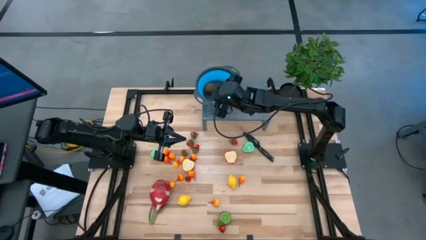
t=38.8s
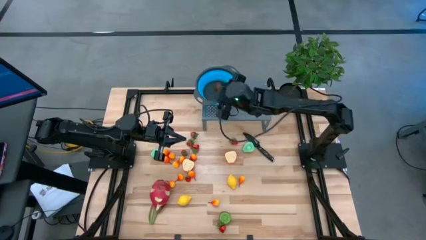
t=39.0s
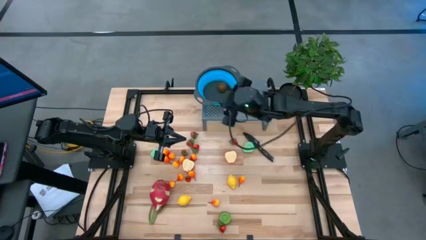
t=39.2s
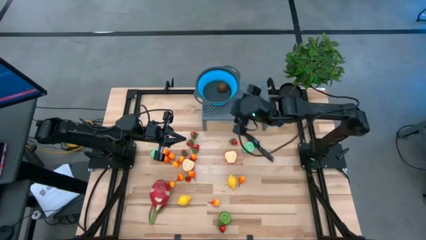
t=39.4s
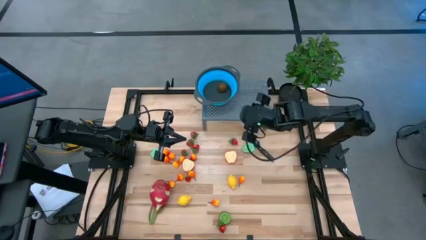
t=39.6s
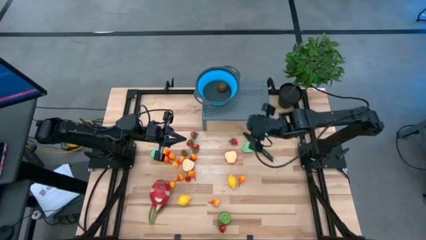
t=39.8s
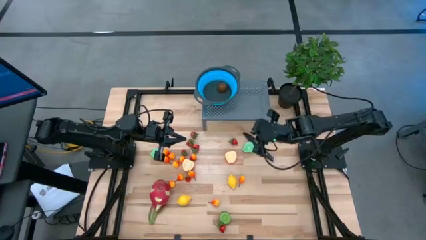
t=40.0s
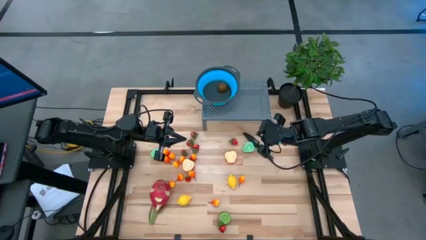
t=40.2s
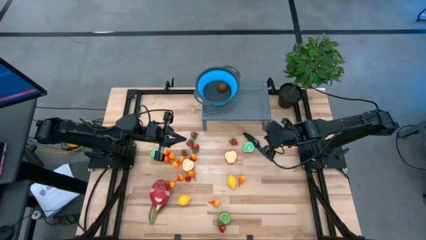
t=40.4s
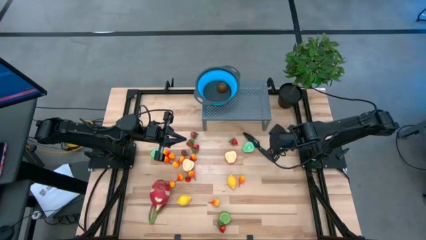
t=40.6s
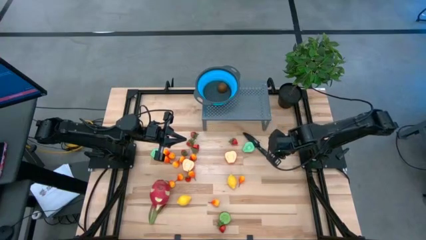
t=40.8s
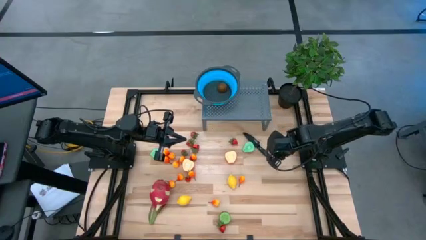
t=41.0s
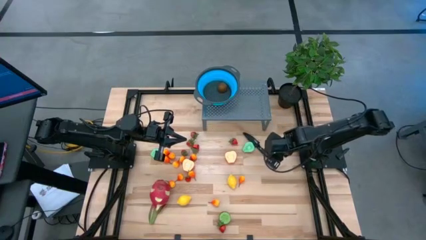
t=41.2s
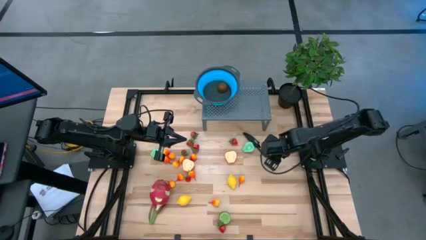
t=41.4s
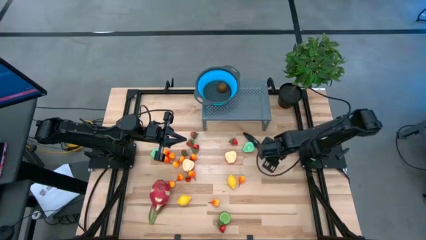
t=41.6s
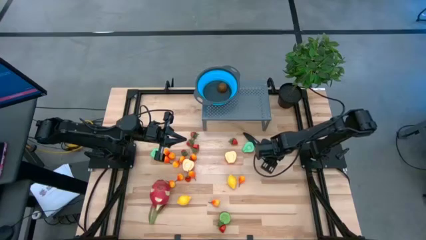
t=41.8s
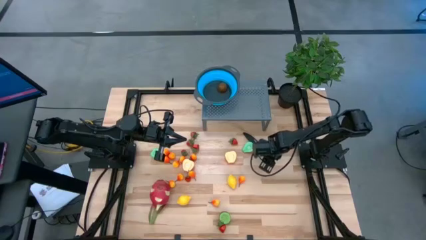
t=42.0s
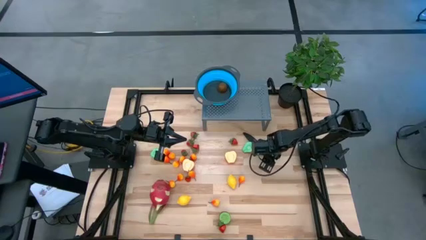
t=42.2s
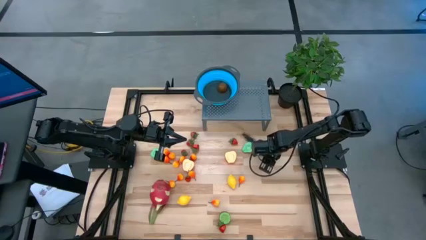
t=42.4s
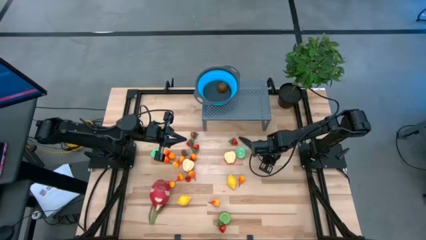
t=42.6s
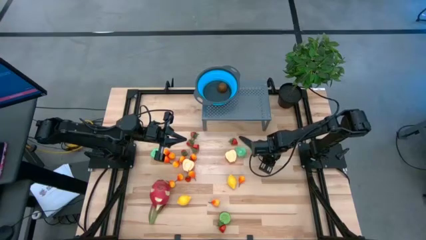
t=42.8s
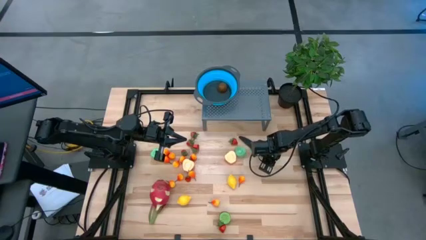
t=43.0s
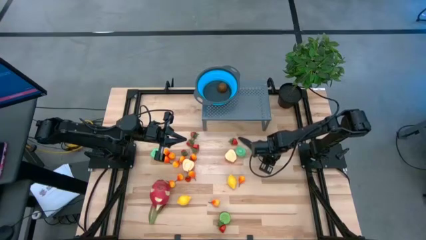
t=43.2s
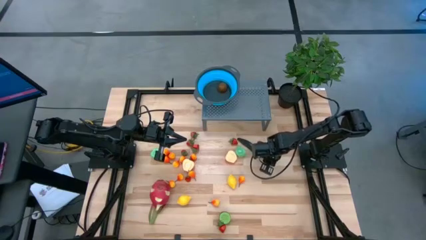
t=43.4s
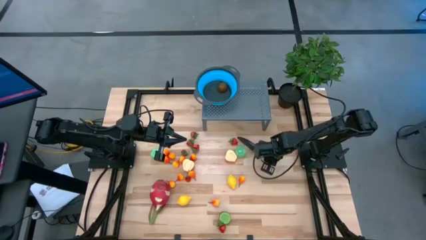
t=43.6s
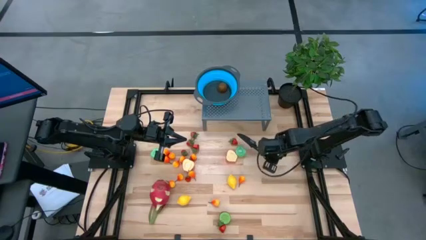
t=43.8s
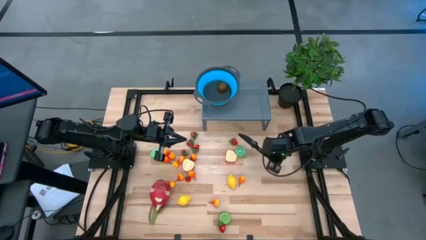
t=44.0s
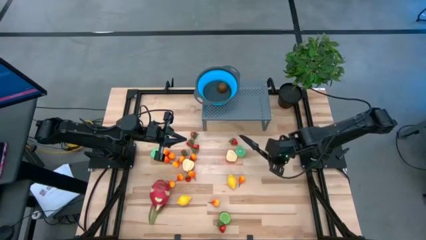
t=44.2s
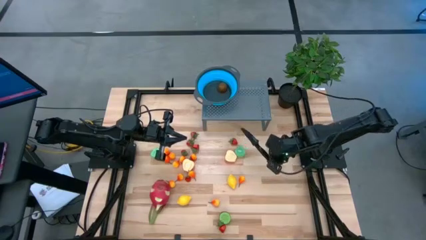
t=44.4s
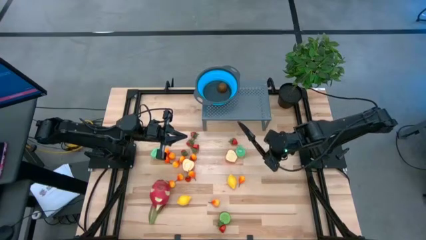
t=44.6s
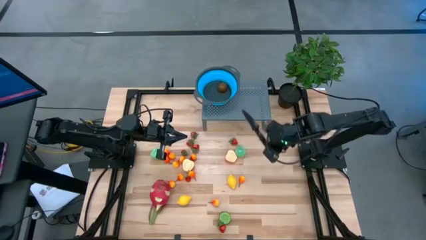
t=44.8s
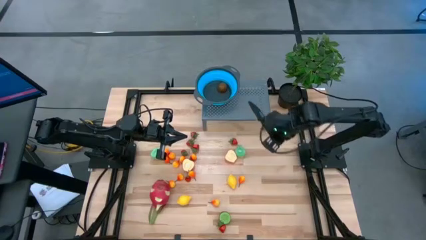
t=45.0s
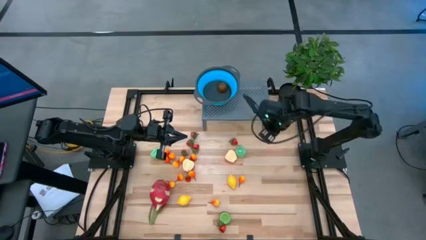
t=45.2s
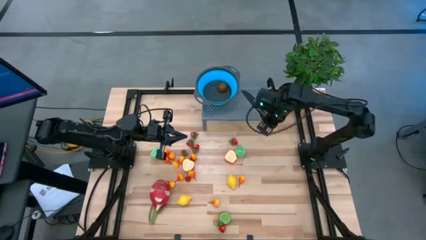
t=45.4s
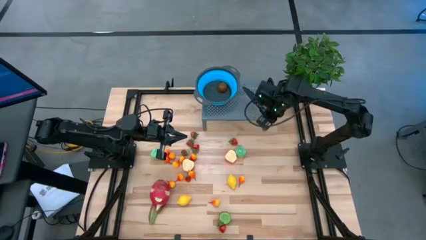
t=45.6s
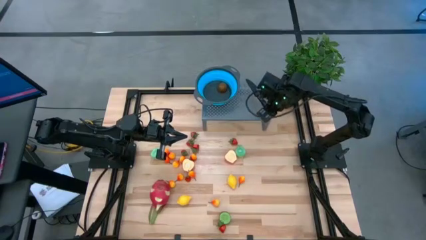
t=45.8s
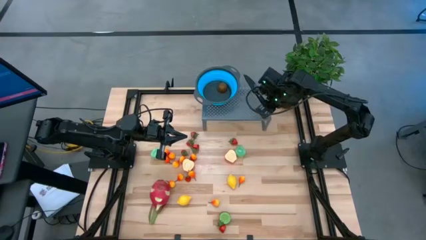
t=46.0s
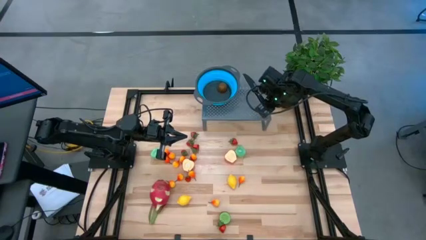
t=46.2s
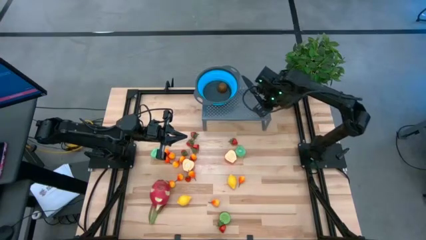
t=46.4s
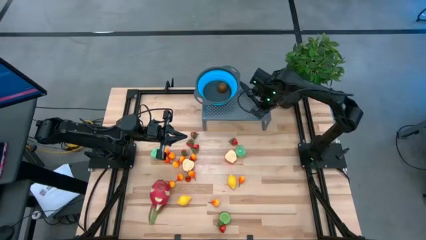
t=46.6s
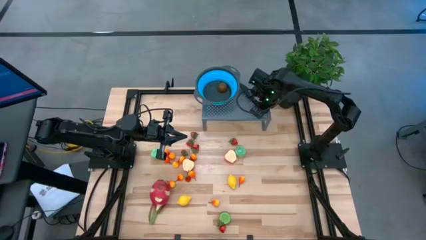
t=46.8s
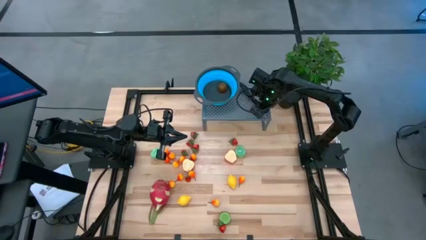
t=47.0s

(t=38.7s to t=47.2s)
Task: Pick & Place Fruit
Put the knife on the shelf to the right of the strainer bowl

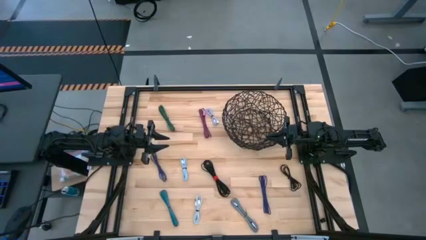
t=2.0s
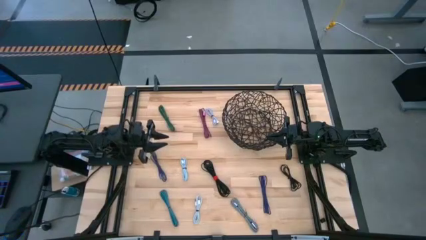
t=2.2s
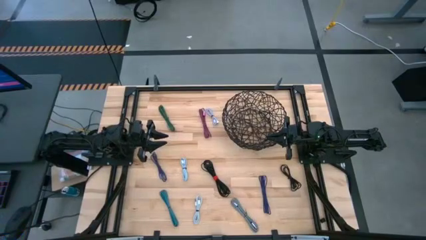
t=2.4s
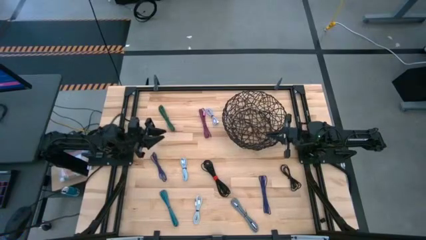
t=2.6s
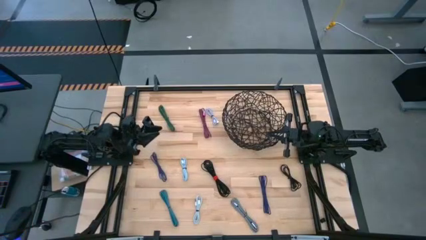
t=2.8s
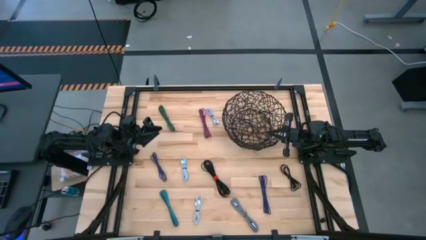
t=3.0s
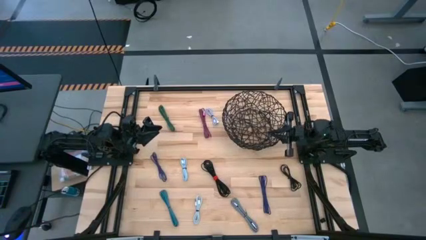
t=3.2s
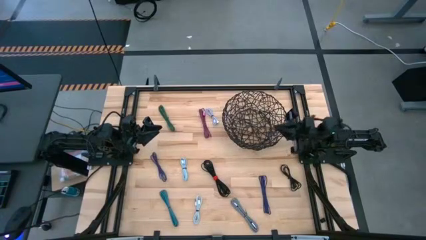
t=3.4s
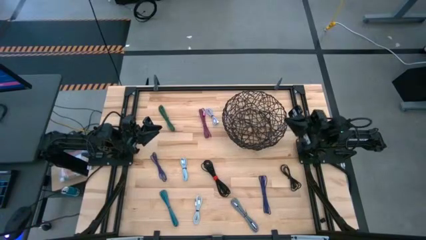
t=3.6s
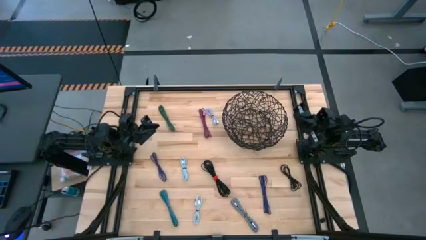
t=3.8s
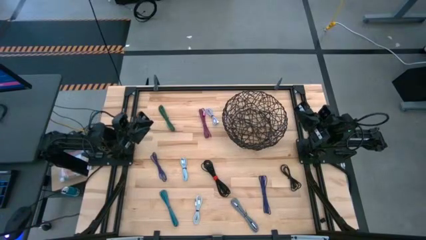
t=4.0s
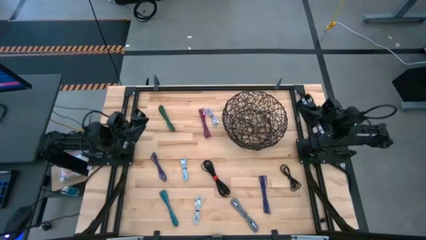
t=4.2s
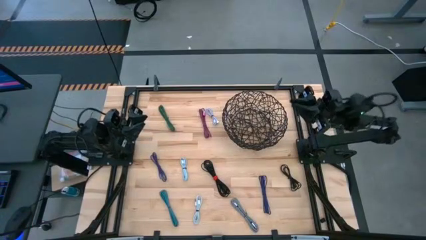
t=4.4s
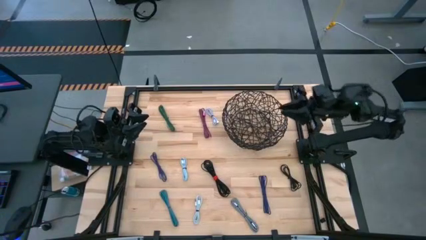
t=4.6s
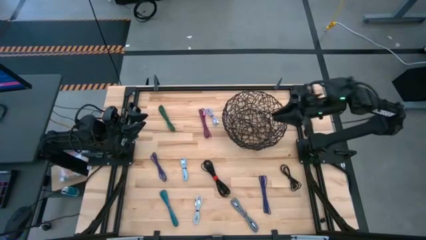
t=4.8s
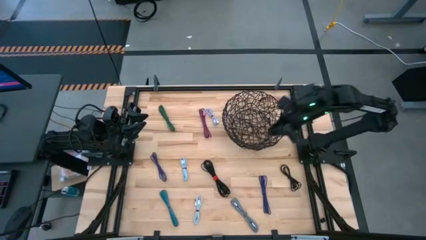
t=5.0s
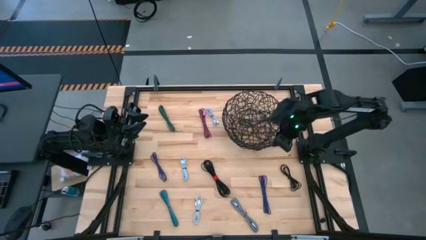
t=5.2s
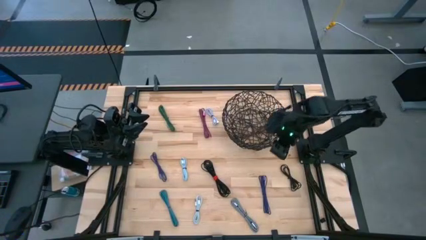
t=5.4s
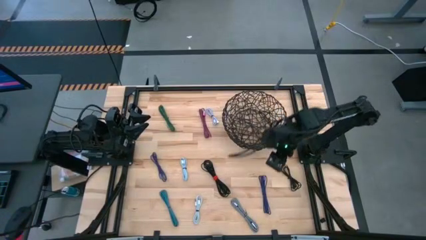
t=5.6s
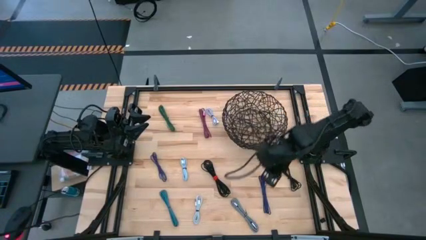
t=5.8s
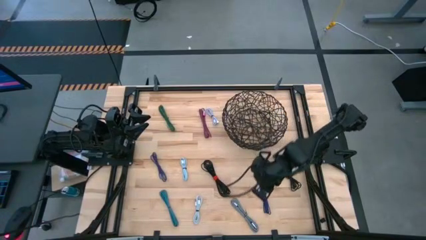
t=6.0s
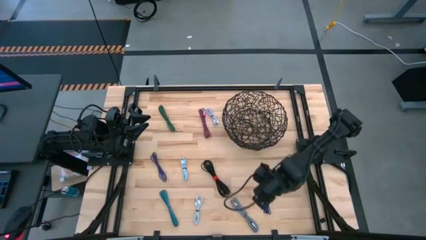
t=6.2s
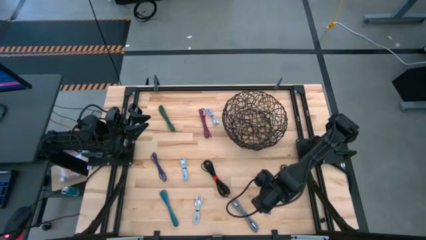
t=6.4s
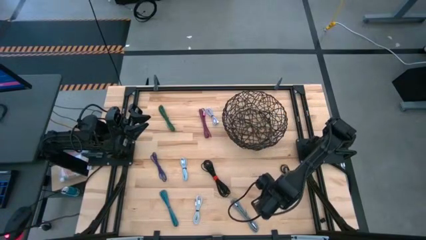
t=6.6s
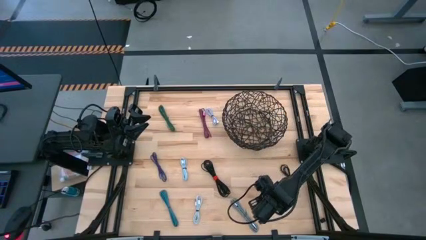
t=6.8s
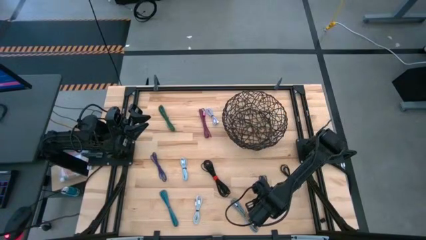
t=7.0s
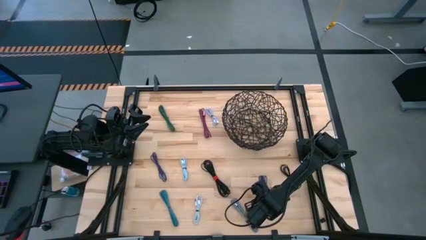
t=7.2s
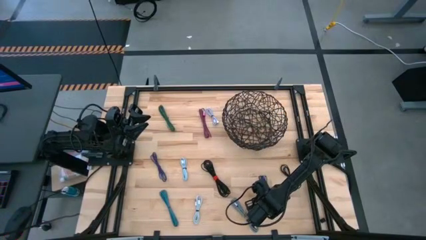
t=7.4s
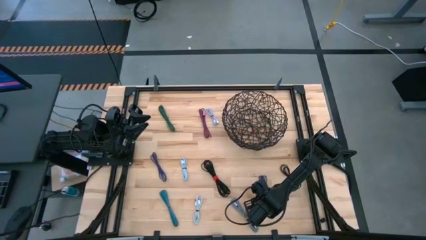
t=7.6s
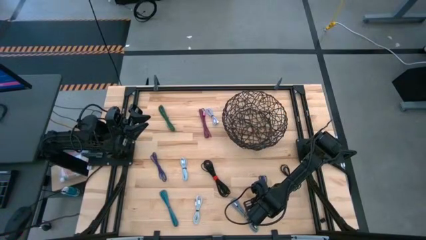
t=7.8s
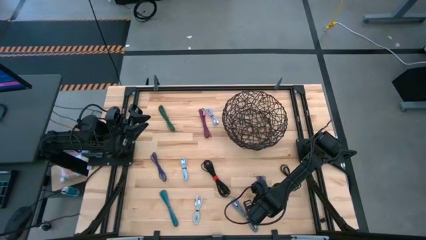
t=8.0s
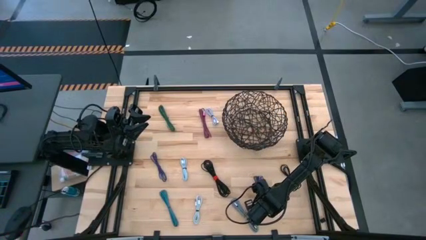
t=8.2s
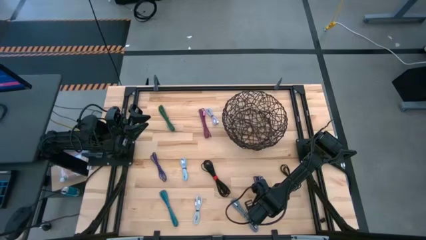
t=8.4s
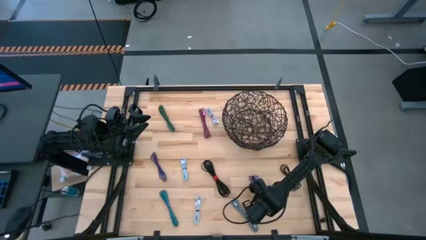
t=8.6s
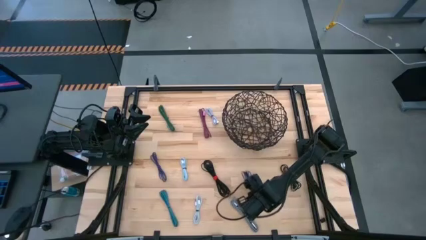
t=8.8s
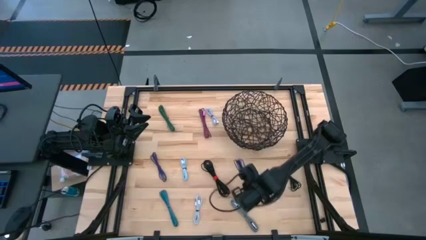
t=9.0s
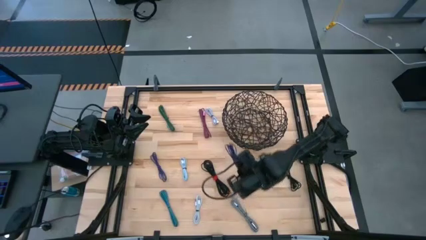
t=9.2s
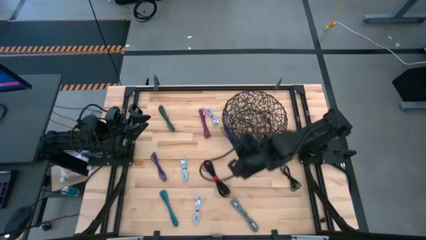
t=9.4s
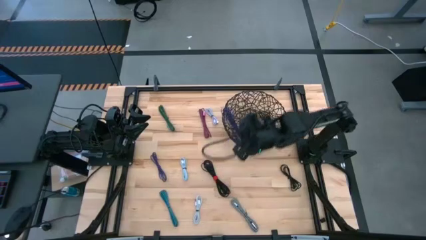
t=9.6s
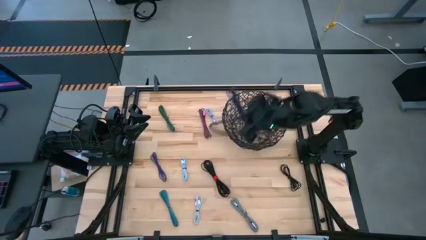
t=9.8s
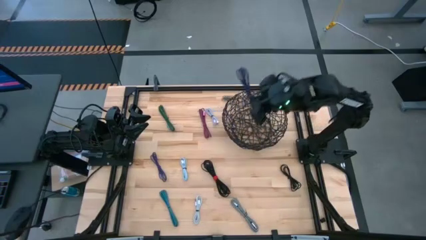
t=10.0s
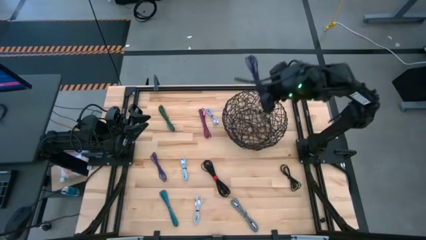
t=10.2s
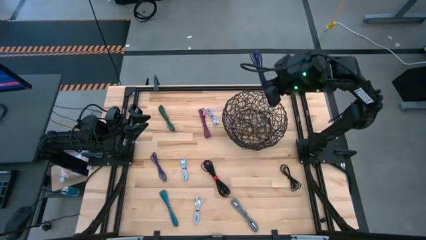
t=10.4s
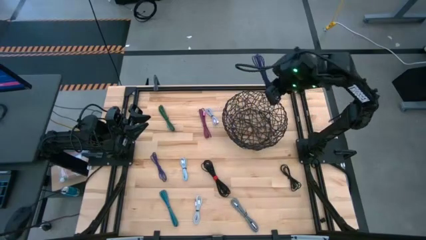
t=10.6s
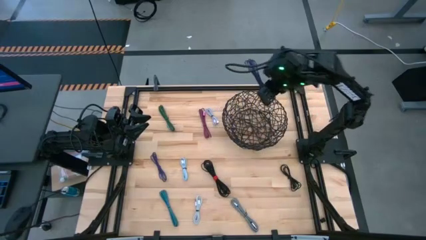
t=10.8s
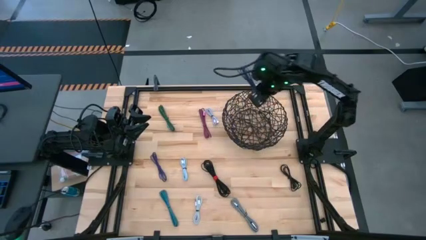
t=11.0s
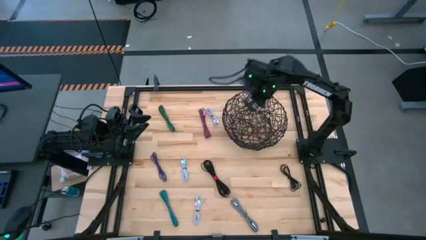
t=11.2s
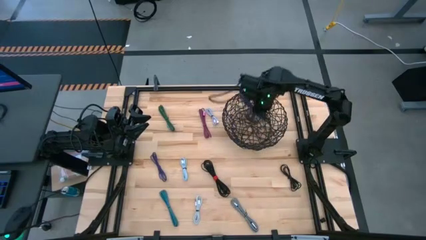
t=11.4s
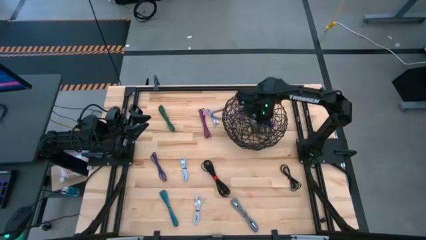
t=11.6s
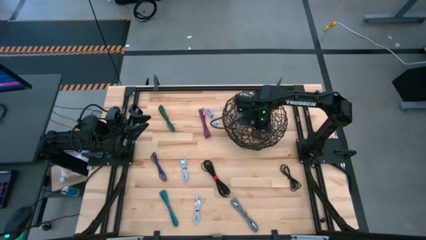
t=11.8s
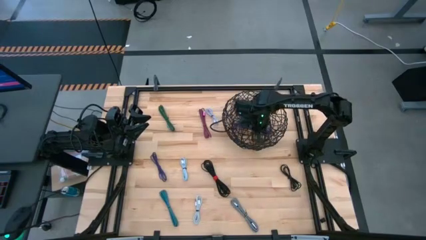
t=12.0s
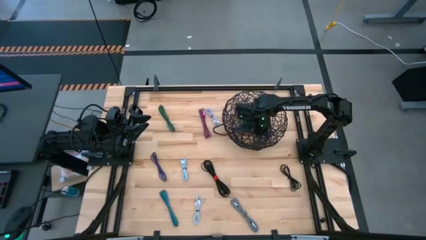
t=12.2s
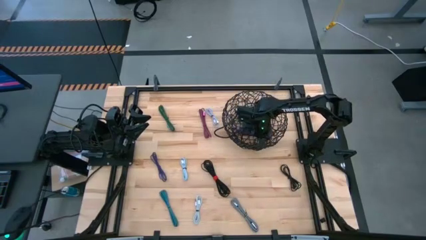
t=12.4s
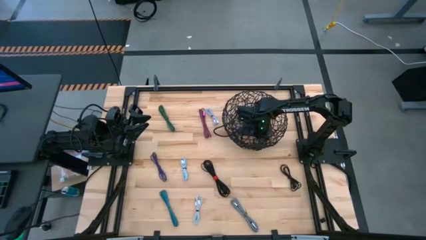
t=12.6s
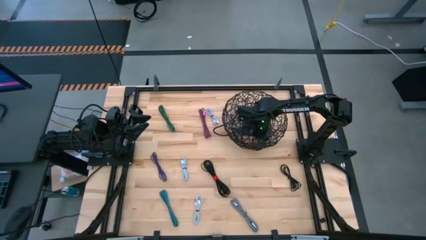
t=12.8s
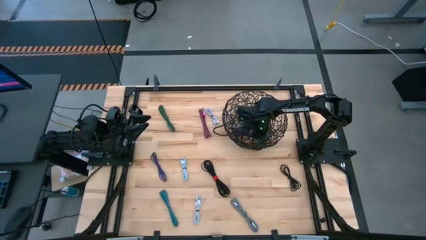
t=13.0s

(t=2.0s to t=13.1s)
Task: Pick and place USB-C Cables
Put the bottom violet charger cable into the black wire basket
